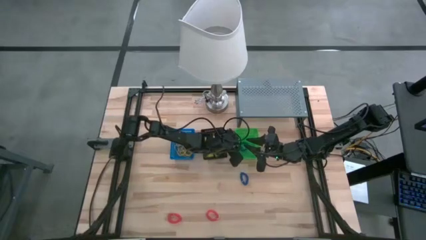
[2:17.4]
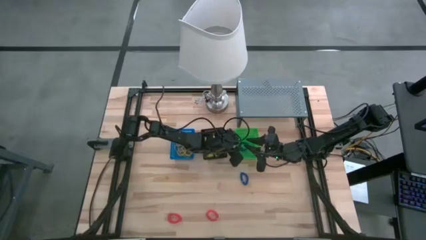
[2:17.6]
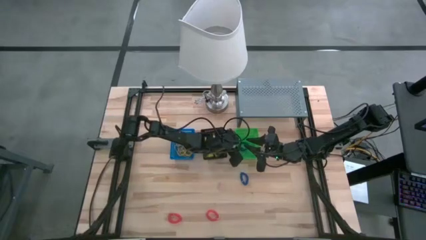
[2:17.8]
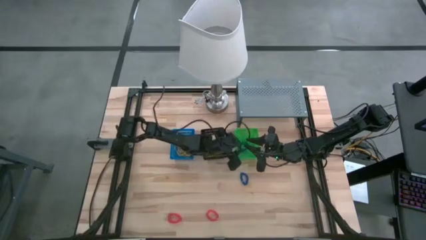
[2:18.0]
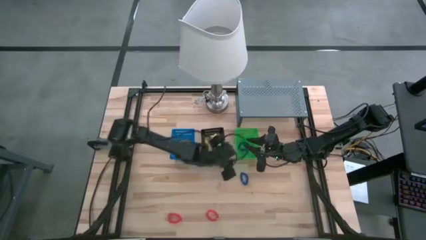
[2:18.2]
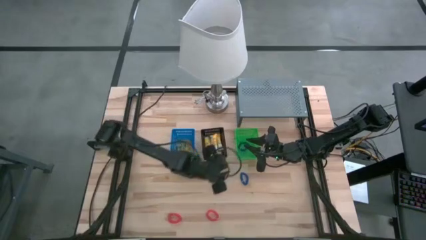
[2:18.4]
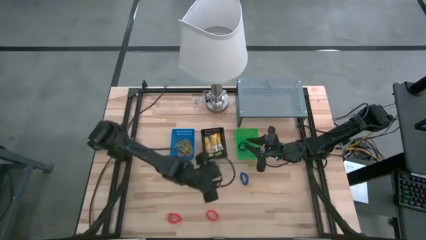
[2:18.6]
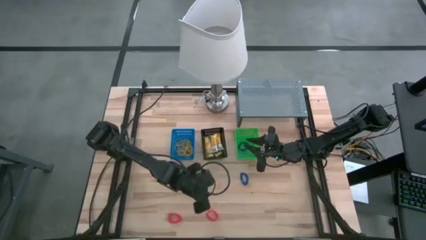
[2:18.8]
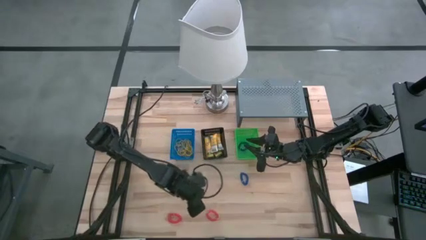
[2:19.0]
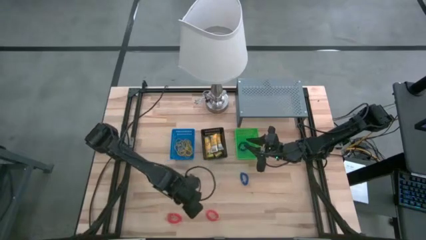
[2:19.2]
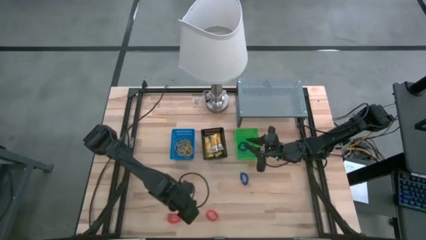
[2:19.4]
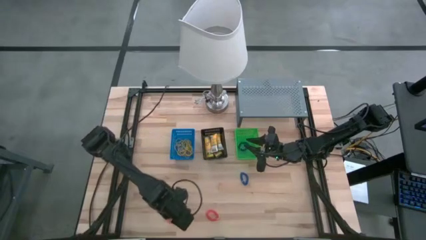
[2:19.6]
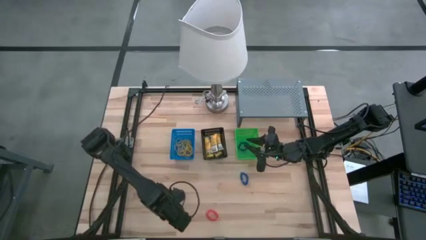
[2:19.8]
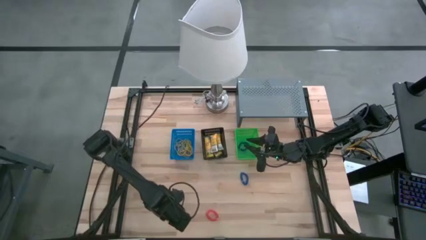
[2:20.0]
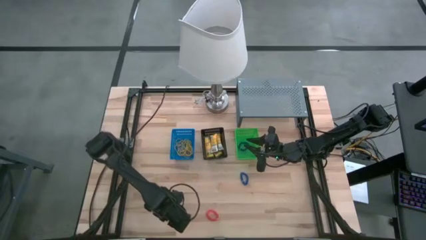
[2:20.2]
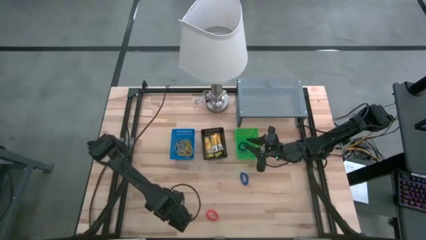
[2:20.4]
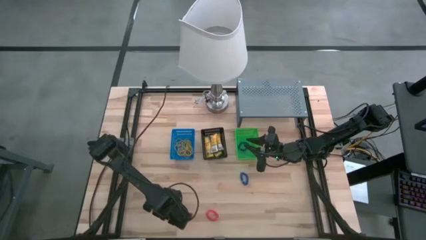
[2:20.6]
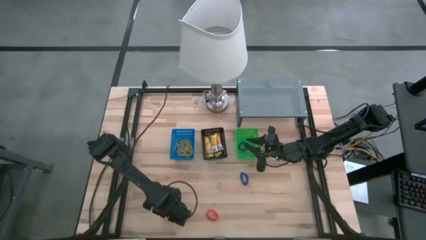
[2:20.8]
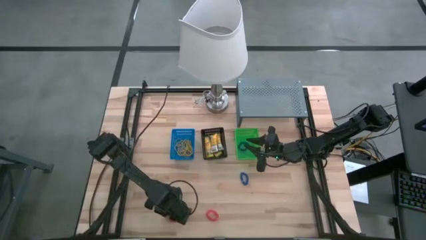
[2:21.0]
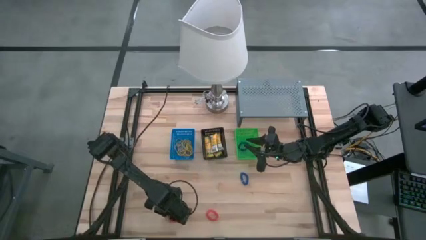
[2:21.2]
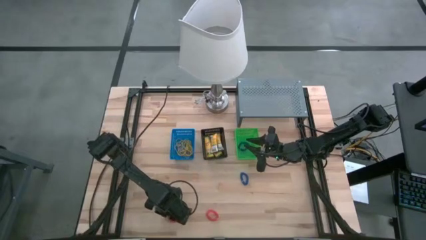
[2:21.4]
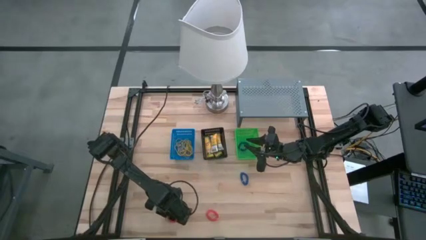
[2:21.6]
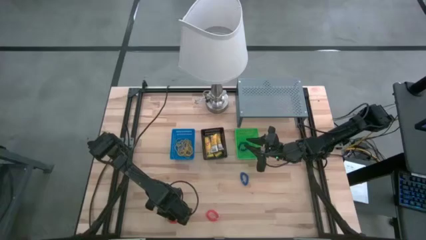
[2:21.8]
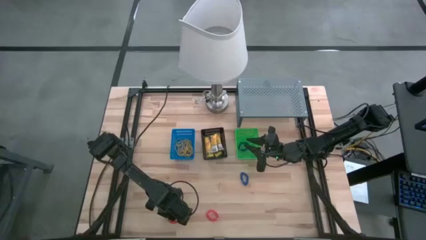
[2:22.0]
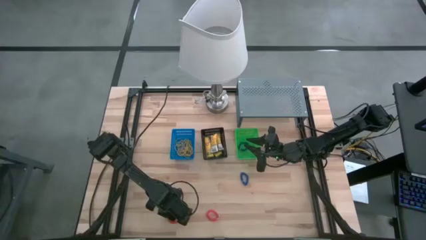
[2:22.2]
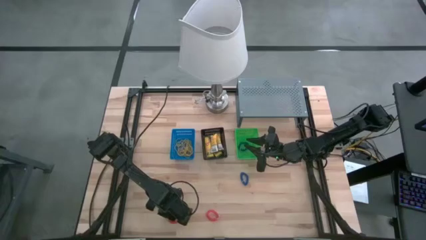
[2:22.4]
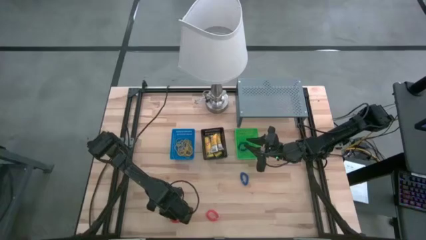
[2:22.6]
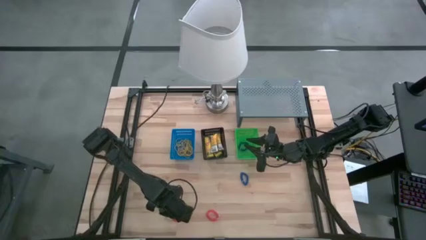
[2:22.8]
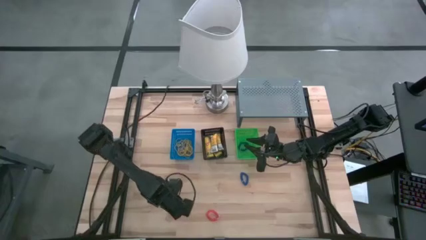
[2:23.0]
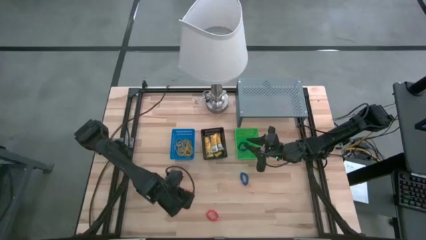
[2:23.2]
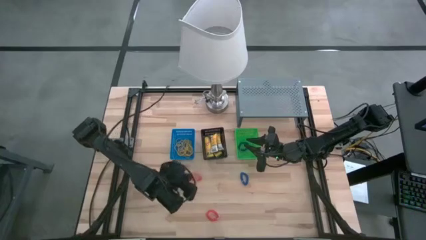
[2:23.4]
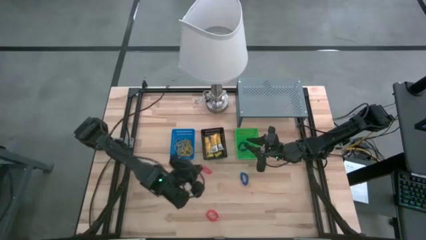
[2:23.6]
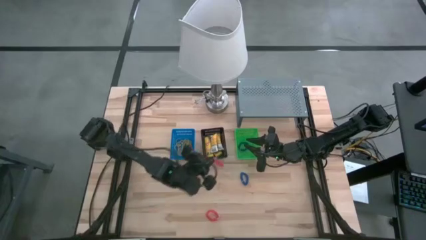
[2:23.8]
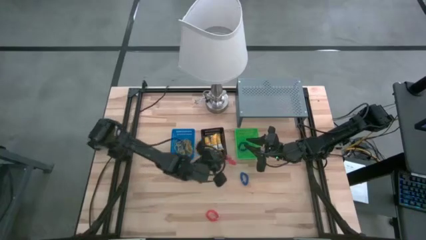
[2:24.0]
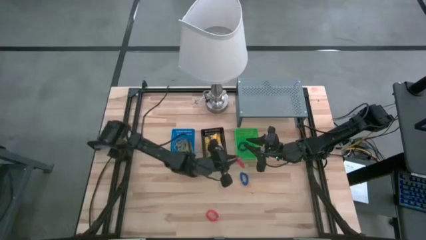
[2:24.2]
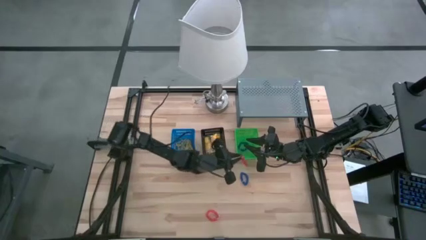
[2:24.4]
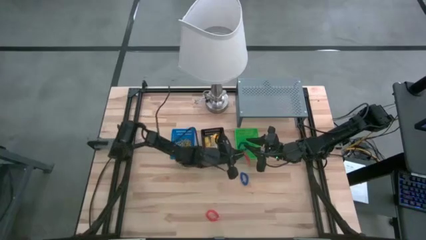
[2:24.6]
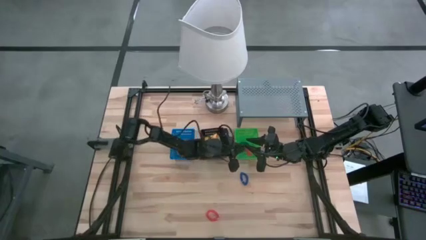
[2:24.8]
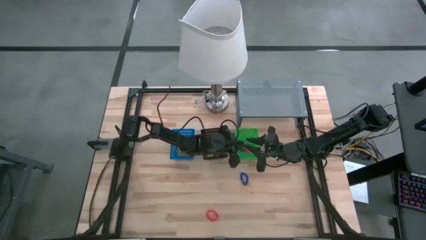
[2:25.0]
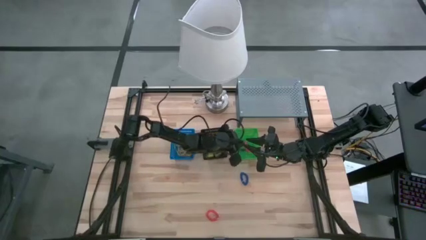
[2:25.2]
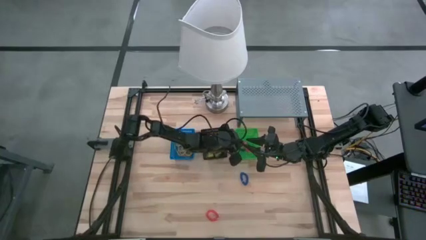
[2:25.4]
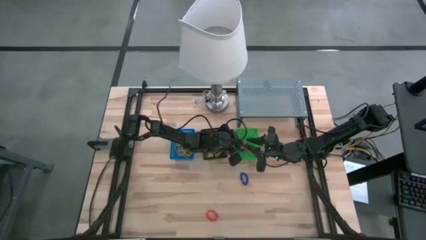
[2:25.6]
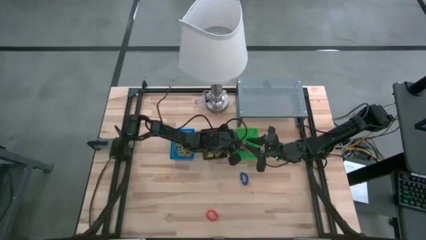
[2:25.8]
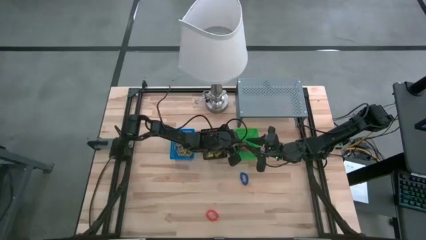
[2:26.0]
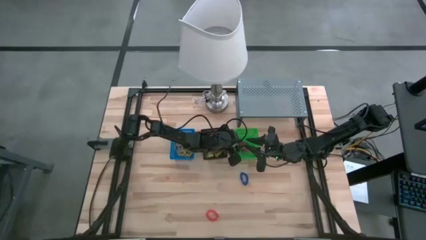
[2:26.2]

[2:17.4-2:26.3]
Task: Pick & Place Office Desk Supplies
Put the orange spring keychain into the green bin

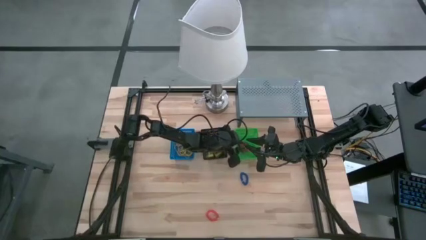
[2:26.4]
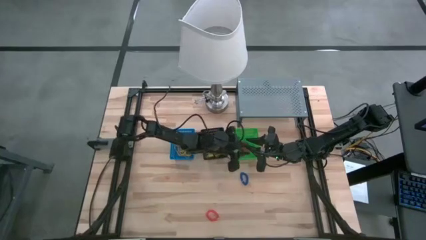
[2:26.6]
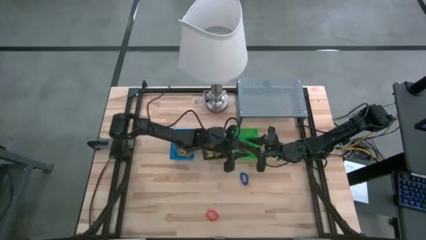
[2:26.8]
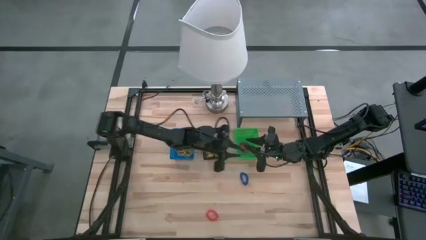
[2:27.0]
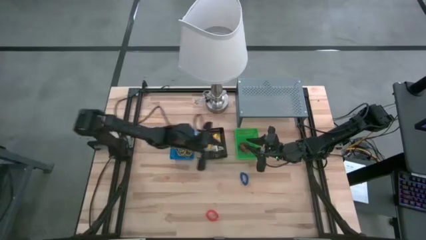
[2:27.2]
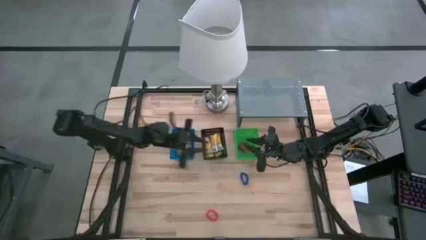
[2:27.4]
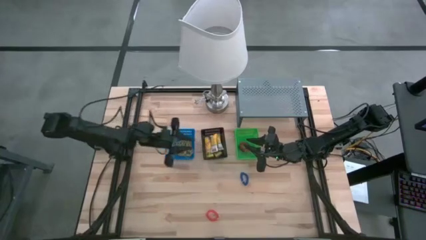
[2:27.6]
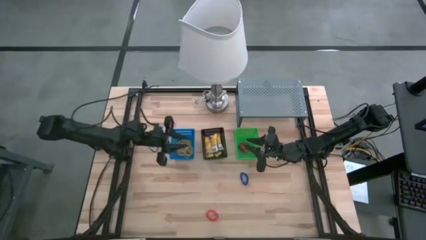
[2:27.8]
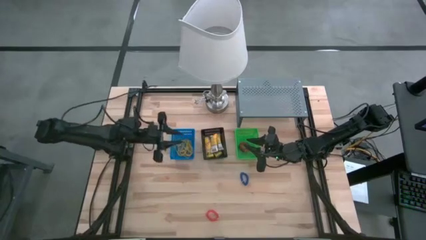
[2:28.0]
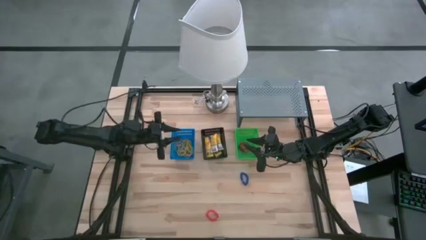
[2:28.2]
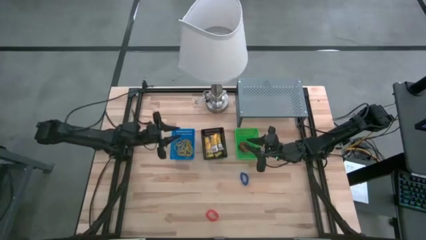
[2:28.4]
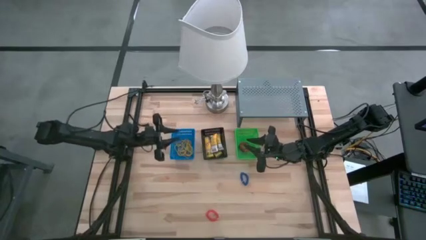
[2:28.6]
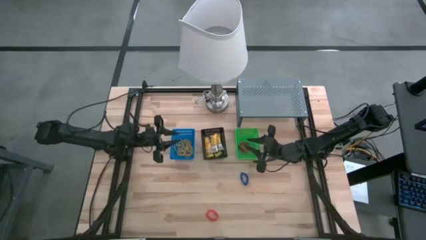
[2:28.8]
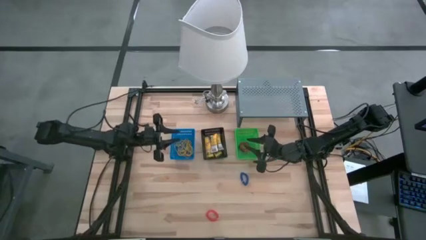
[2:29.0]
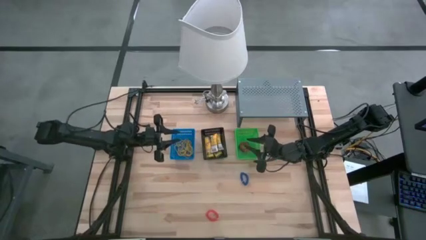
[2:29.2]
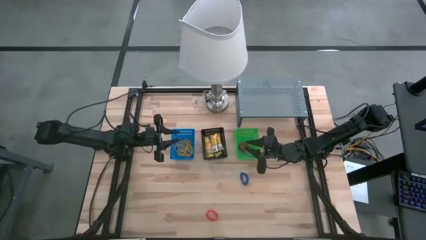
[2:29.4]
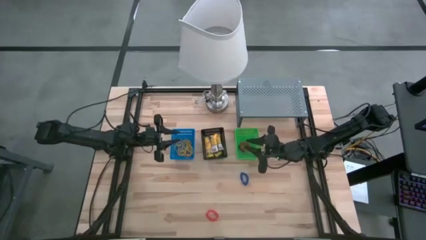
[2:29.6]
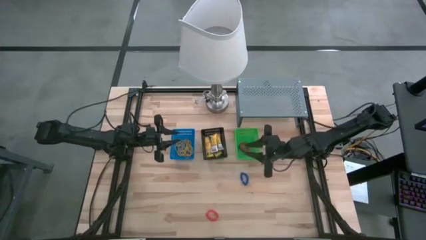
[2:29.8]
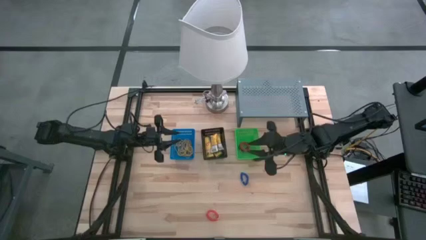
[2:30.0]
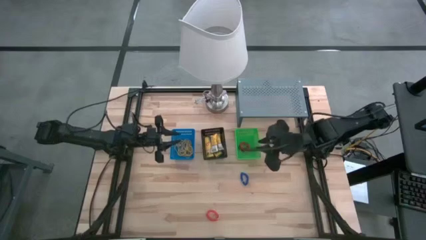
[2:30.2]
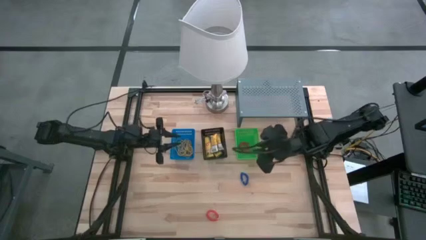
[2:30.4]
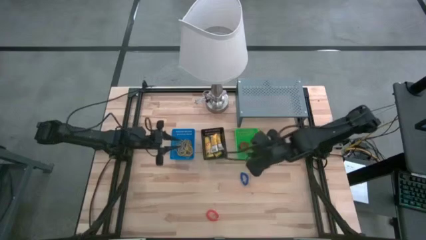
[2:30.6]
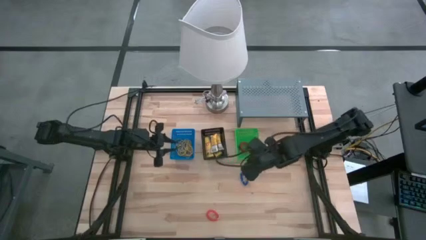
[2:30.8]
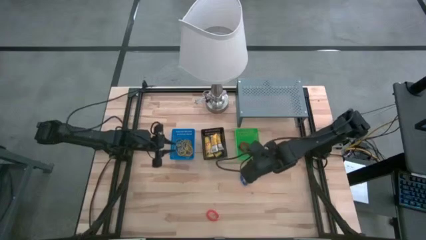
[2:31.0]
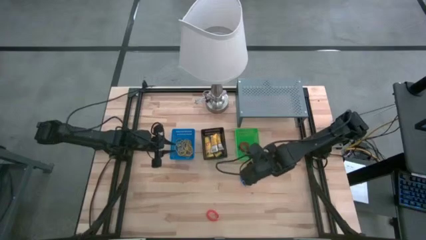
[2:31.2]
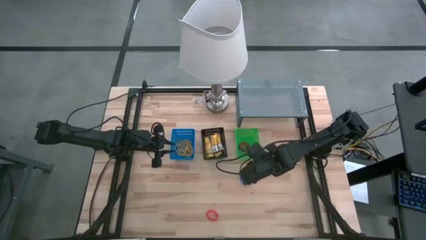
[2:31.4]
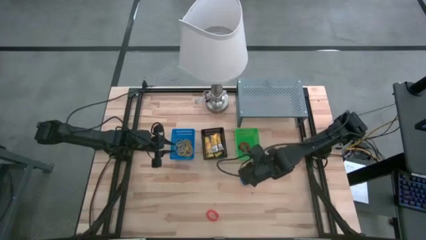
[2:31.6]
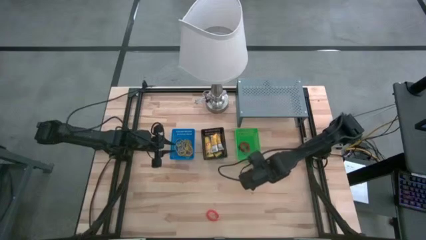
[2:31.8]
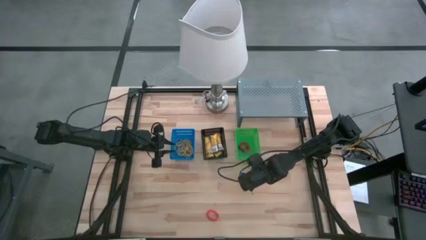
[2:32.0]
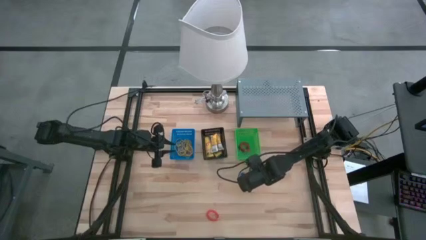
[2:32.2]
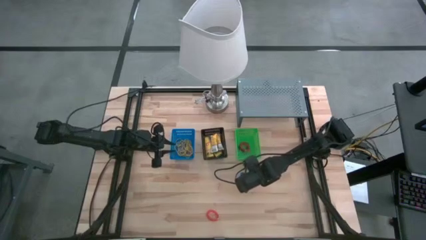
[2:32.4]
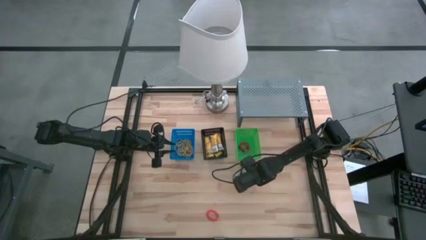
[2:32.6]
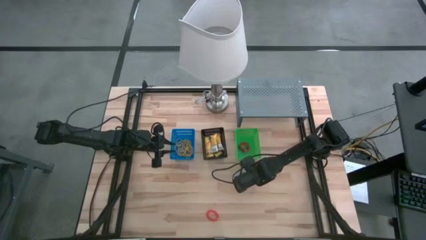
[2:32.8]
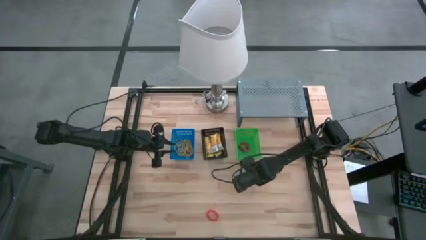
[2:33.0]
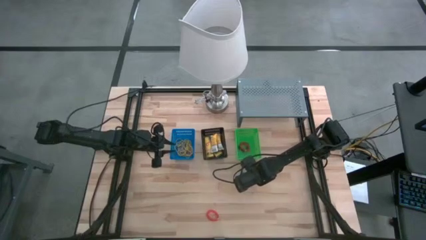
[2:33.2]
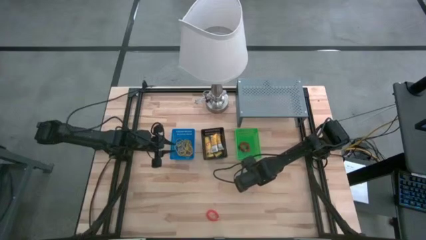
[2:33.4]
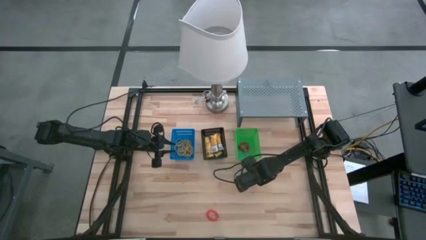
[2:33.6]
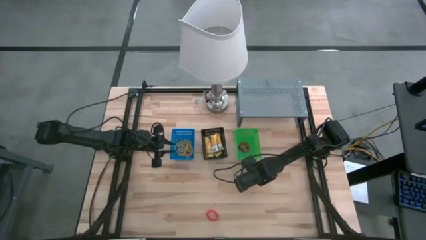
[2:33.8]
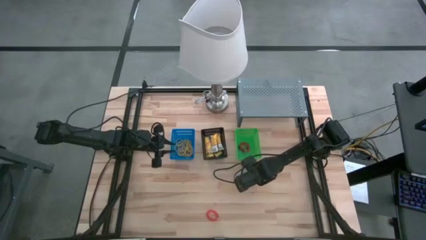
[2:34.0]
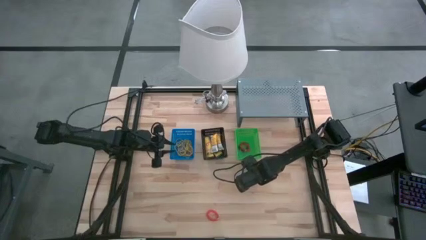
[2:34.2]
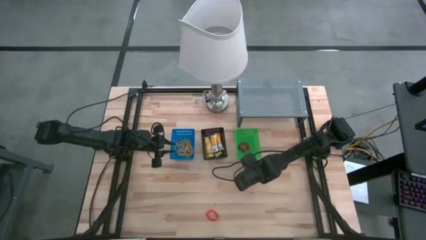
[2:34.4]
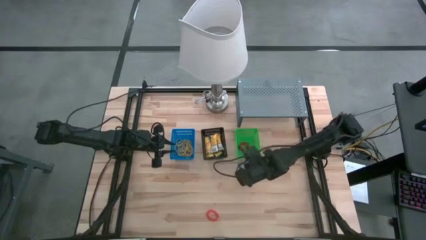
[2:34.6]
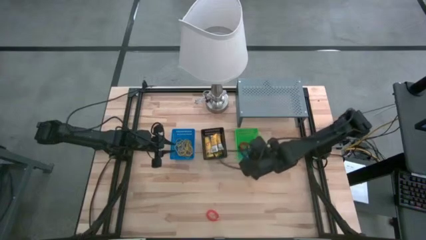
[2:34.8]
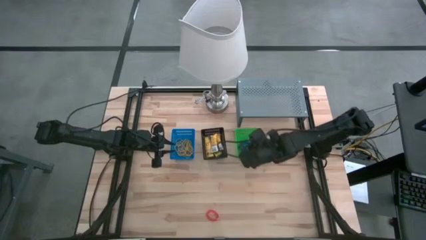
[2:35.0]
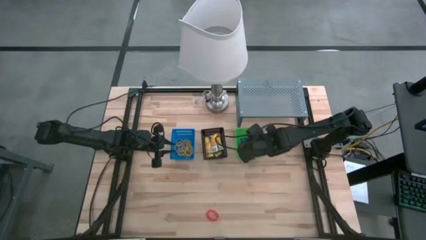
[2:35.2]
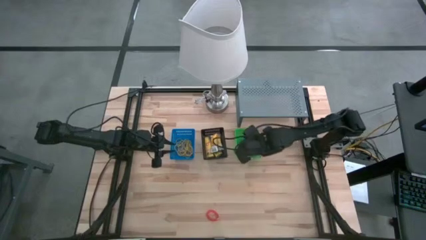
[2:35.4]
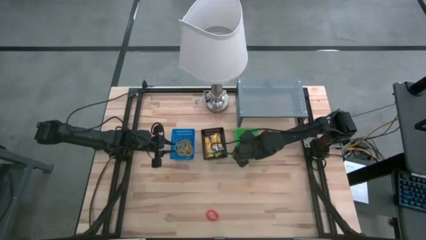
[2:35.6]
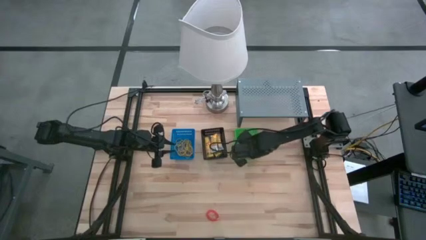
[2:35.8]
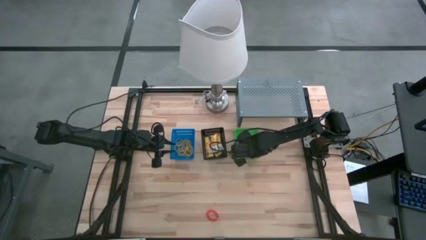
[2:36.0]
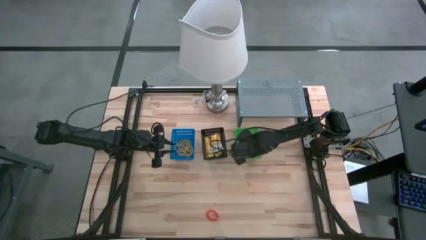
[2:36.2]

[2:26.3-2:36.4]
Put the blue spring keychain into the green bin
